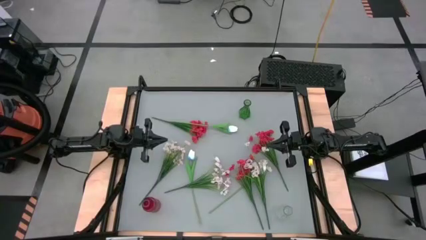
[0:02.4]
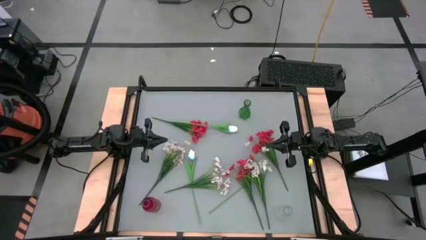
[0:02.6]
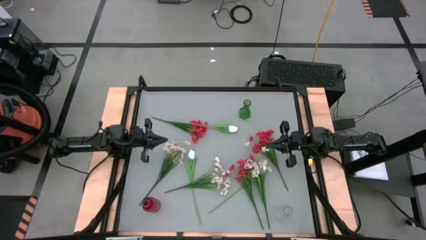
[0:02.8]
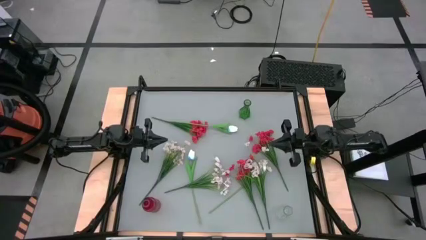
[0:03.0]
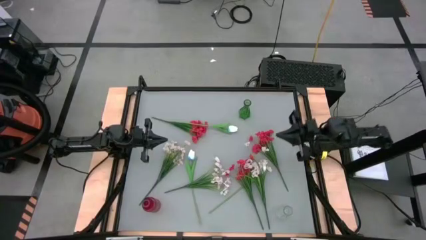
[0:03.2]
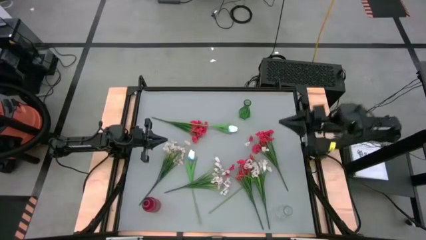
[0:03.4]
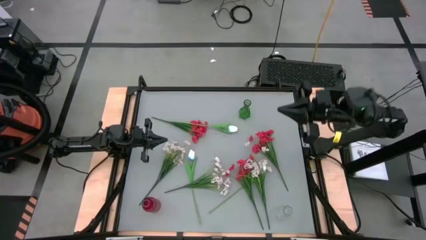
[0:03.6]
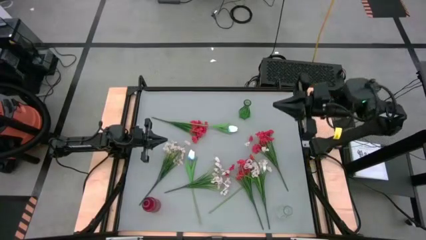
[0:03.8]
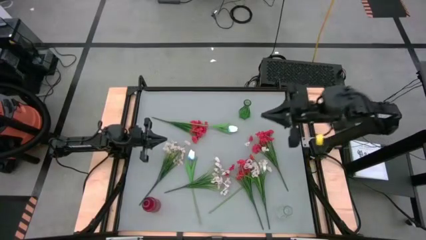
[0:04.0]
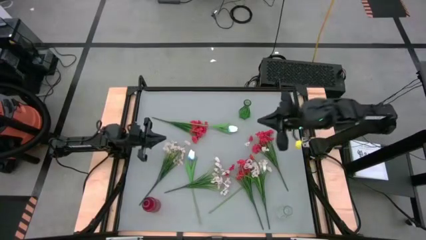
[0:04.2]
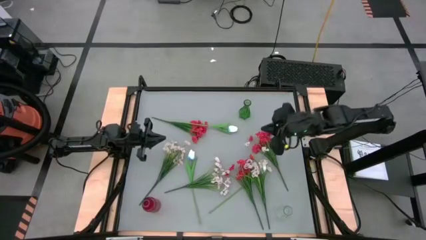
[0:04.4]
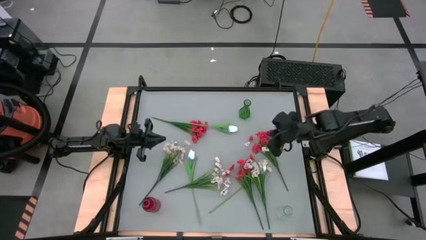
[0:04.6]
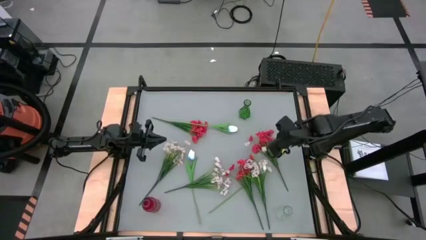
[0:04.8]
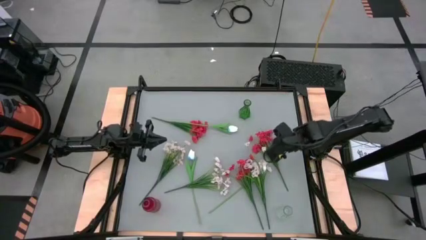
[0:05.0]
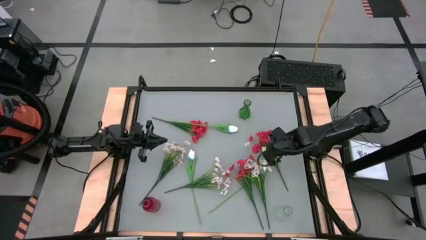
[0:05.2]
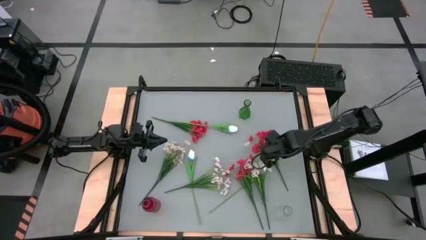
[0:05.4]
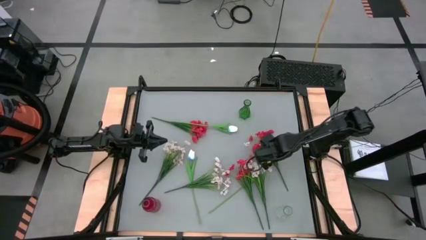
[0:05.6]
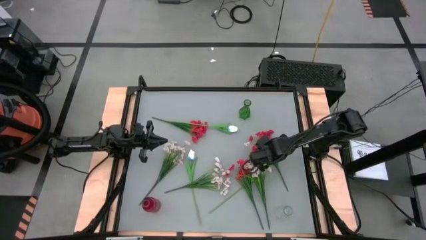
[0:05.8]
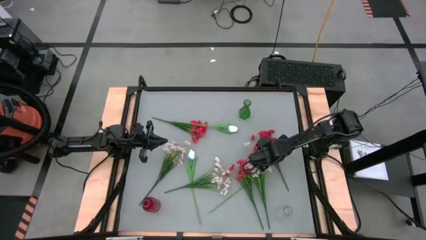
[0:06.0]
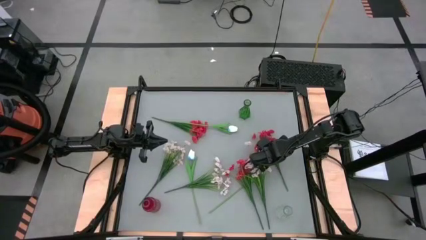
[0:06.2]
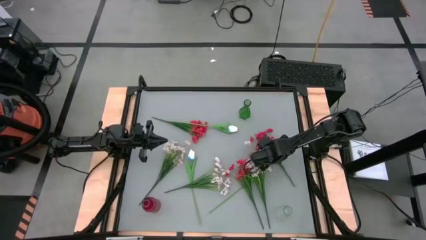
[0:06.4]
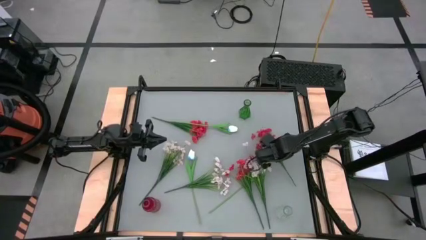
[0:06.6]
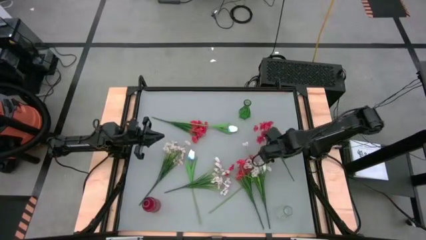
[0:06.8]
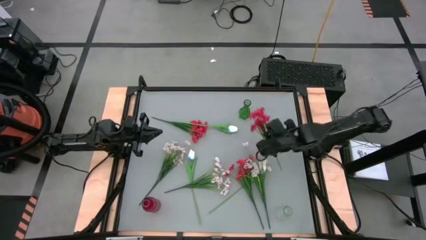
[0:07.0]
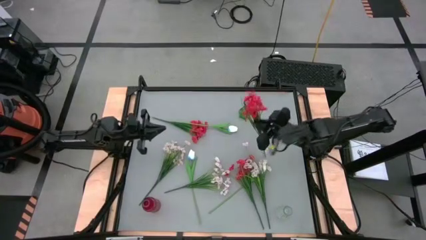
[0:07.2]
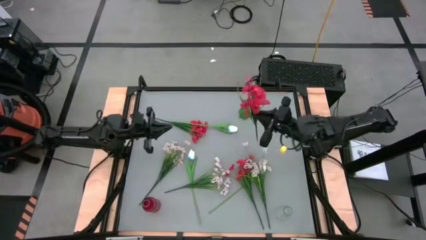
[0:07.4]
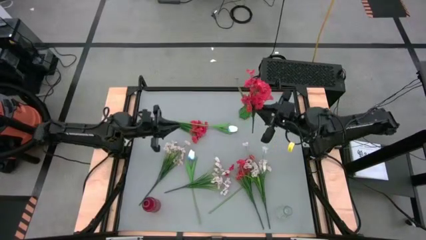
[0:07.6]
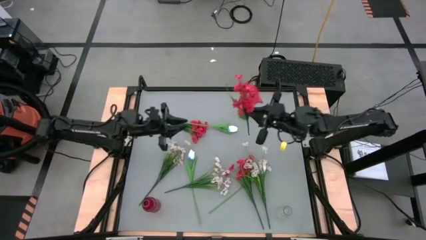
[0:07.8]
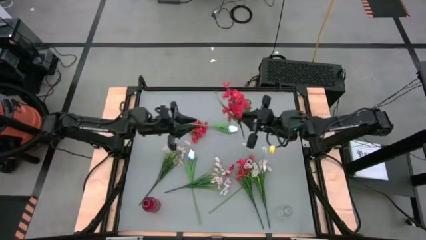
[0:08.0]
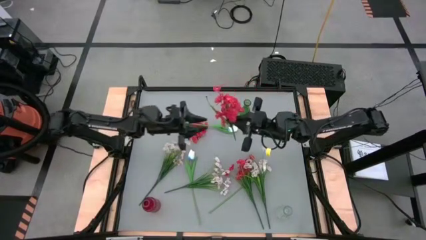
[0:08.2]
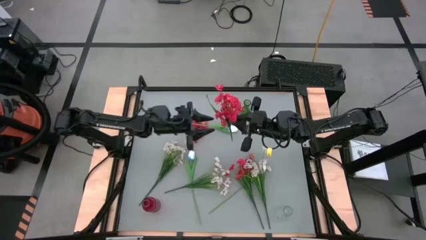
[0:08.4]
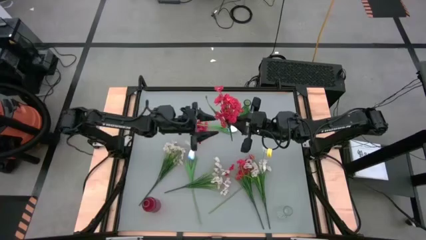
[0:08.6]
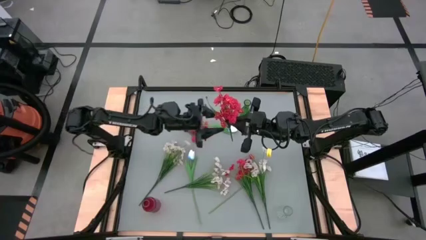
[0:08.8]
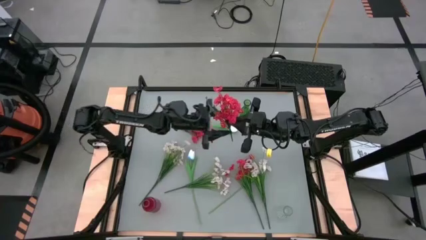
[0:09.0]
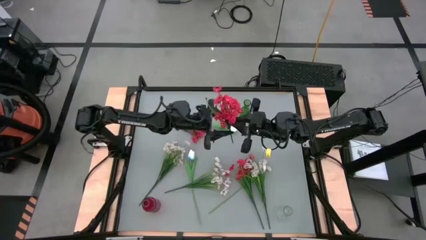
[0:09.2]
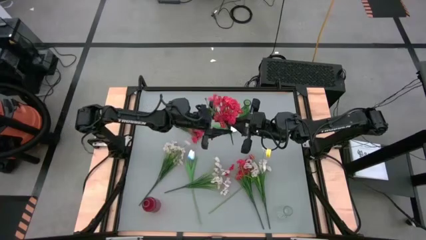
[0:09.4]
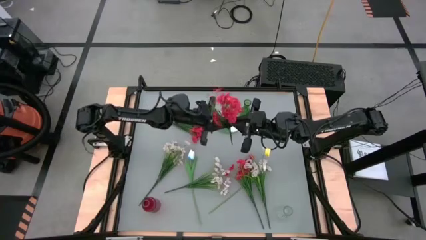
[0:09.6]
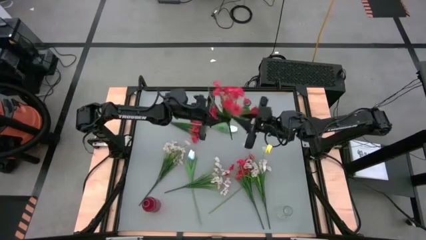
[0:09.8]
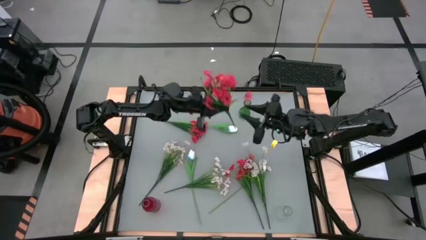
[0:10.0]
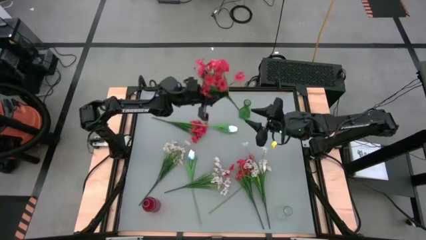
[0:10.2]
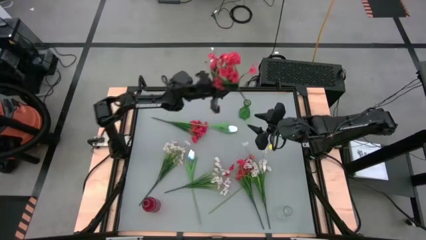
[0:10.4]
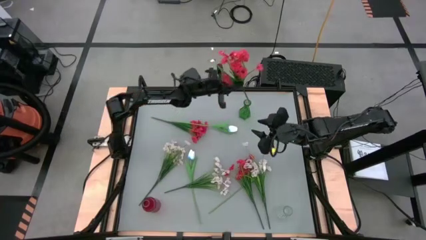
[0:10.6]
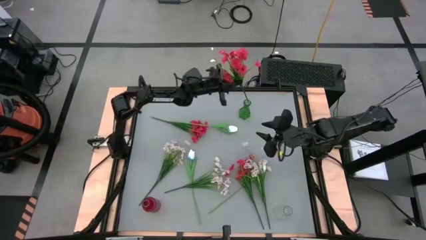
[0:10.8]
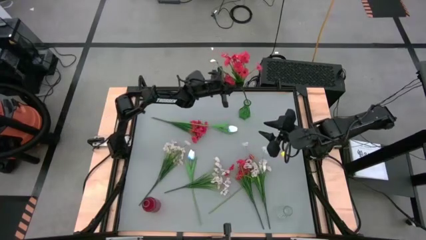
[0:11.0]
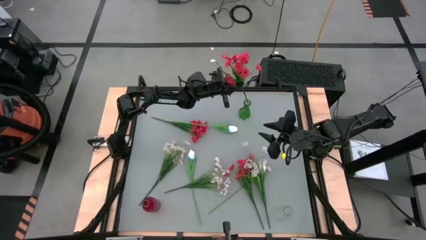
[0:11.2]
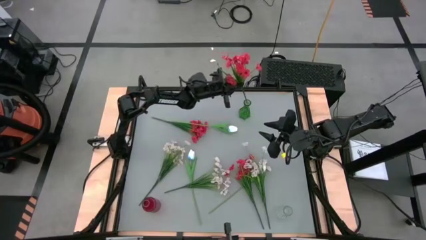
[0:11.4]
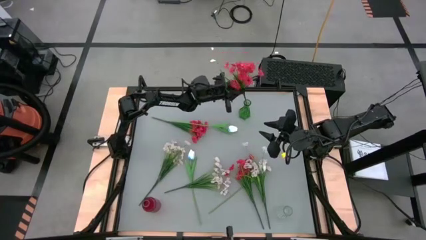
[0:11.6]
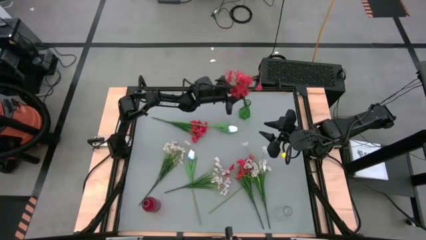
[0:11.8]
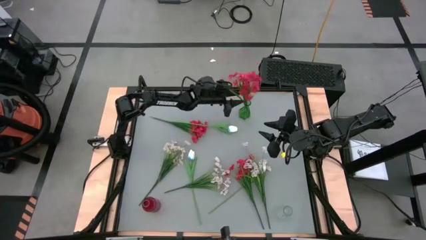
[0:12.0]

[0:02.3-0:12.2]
Task: Sort flowers into vase by color
Put the right red flowers into the green vase

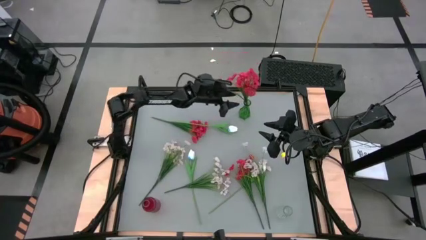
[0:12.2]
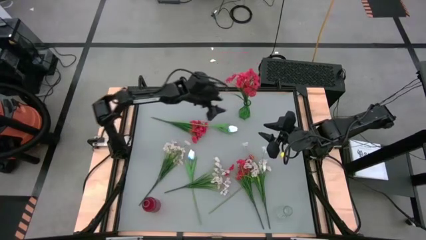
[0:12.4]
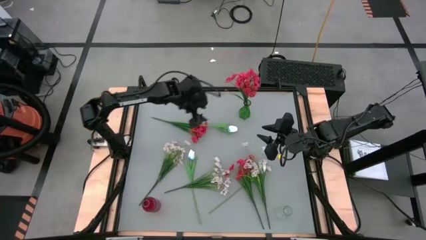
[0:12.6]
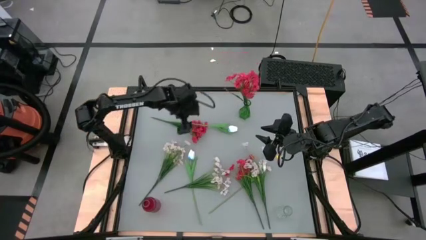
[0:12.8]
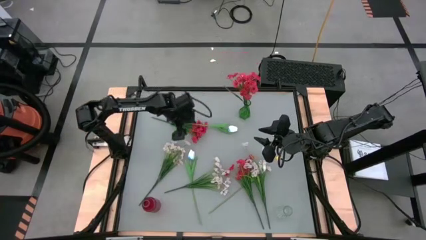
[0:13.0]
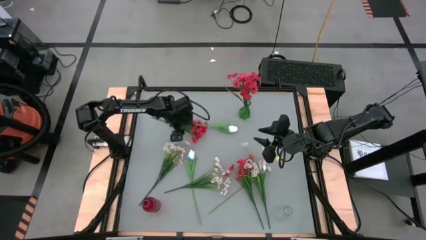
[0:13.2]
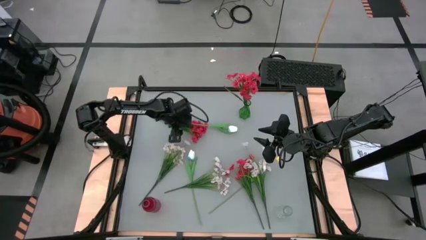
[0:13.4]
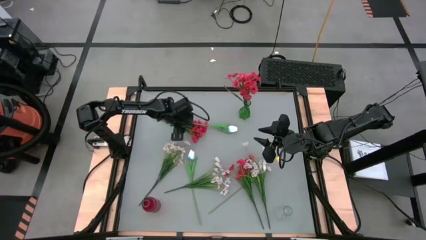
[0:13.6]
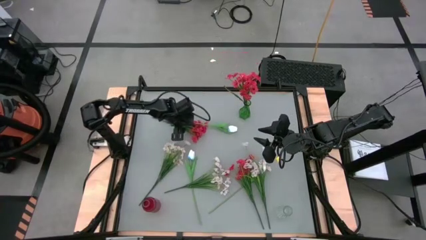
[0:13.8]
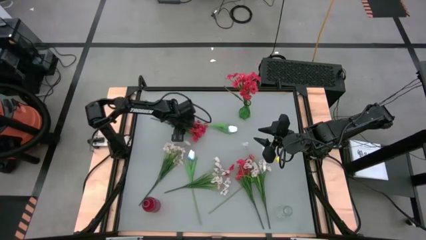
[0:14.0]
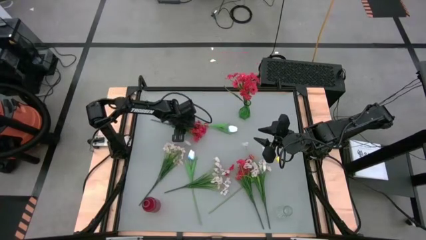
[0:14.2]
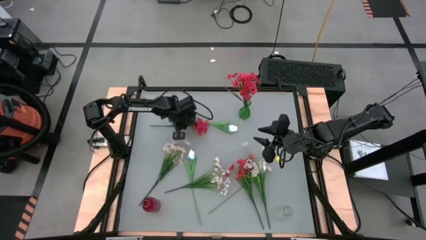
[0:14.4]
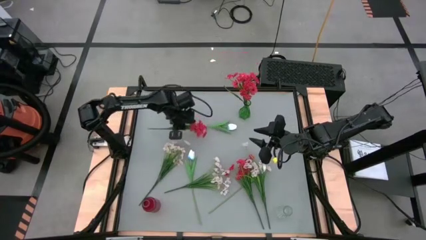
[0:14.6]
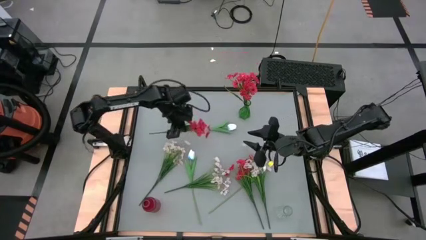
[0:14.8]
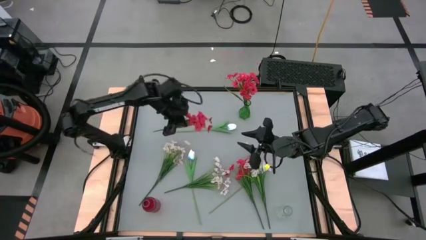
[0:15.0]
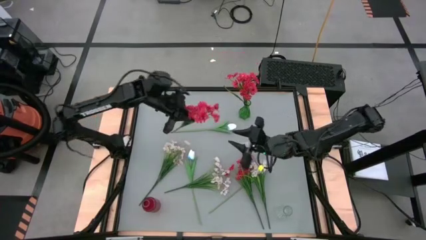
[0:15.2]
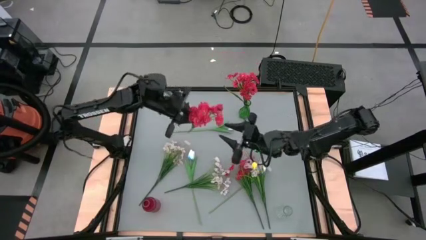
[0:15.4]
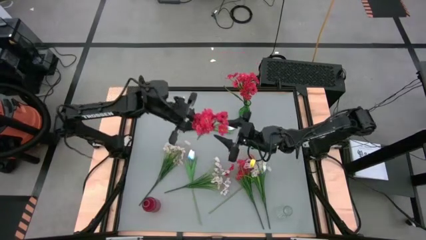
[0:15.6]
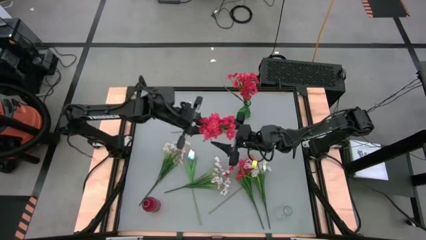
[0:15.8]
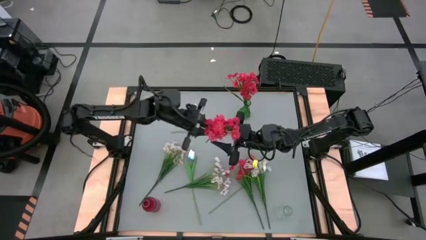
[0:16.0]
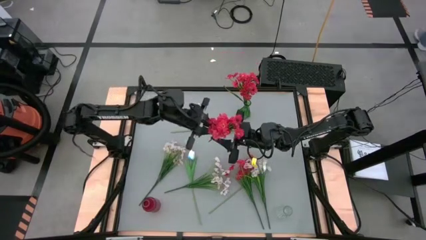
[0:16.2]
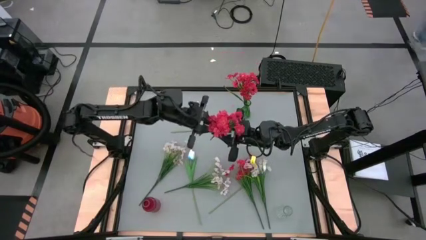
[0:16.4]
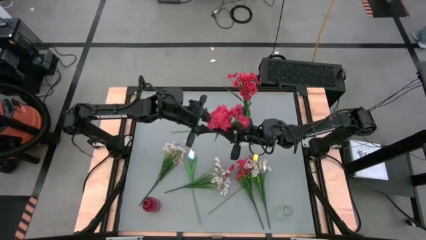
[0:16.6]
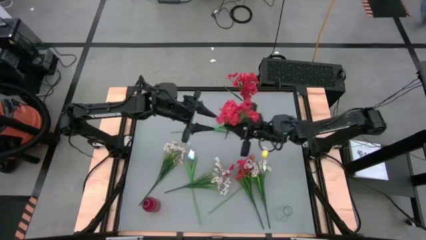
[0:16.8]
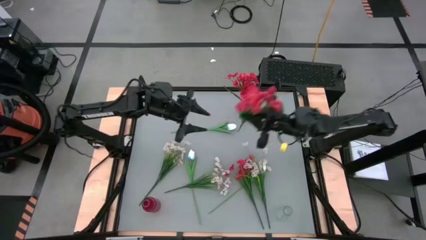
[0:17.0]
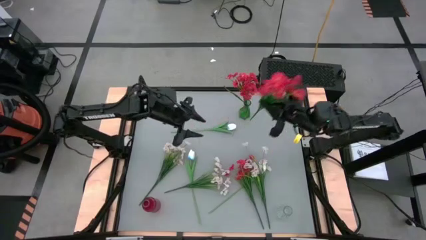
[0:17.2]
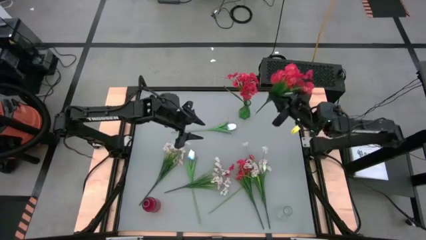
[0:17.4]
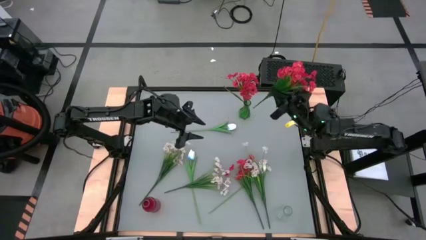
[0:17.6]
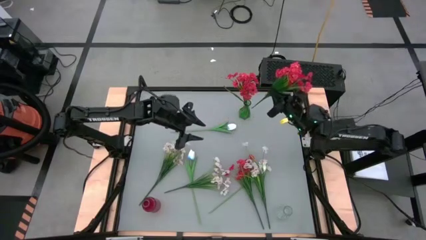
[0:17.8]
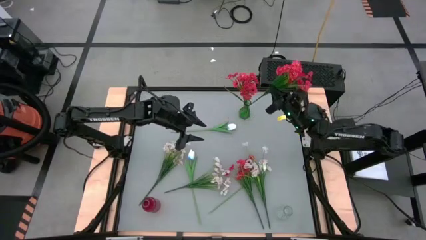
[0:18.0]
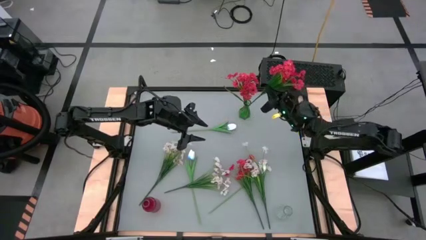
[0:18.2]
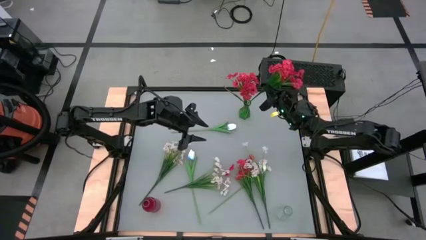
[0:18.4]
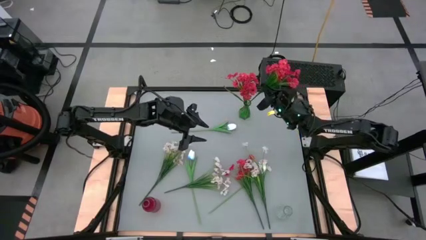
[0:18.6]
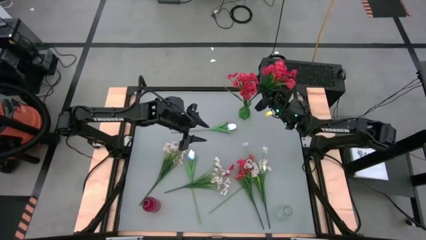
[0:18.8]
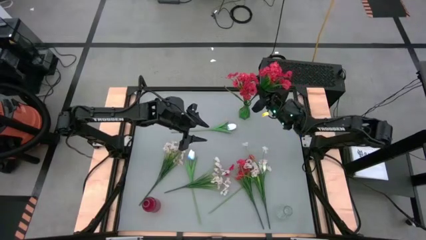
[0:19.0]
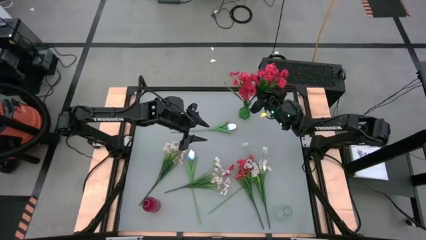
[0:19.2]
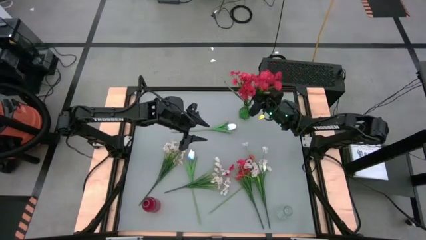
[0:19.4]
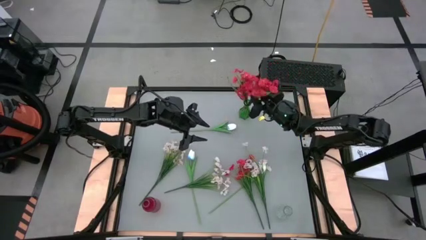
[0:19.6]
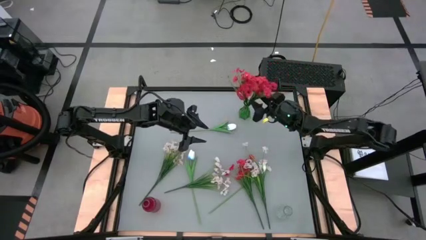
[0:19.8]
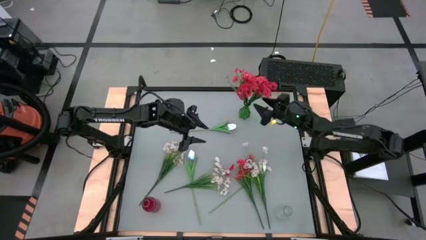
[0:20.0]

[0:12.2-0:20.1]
Put the top red flowers into the green vase
